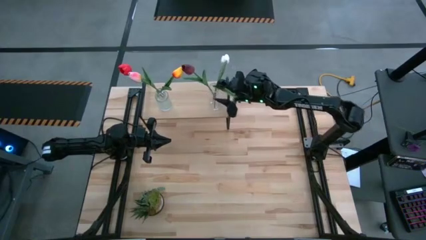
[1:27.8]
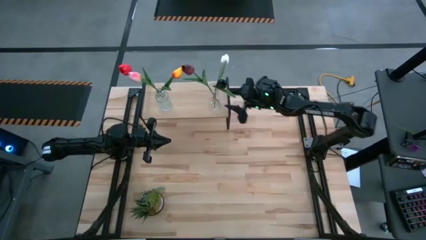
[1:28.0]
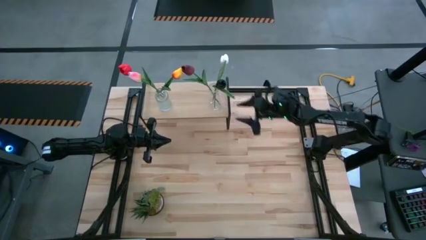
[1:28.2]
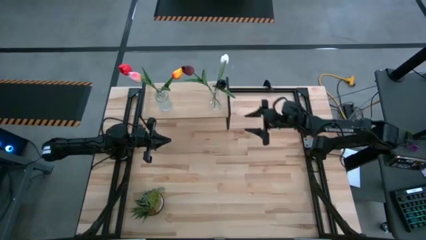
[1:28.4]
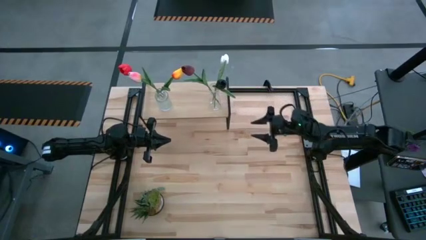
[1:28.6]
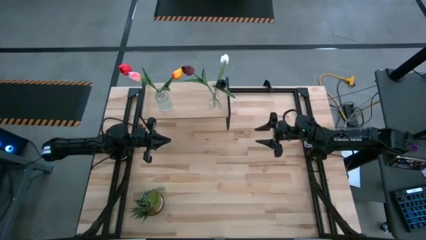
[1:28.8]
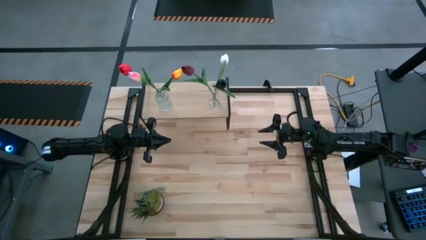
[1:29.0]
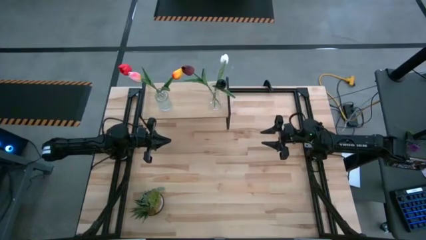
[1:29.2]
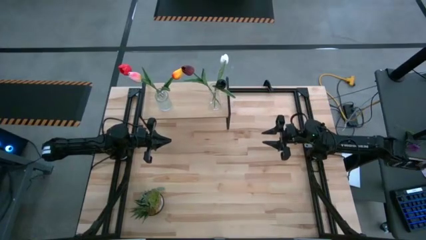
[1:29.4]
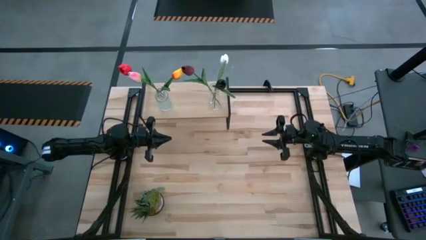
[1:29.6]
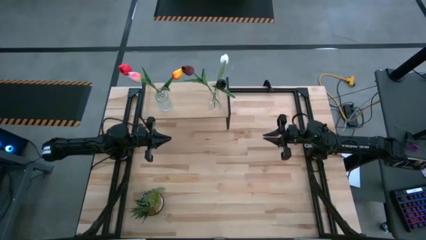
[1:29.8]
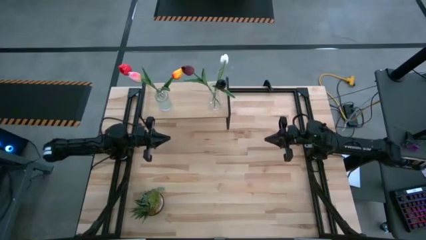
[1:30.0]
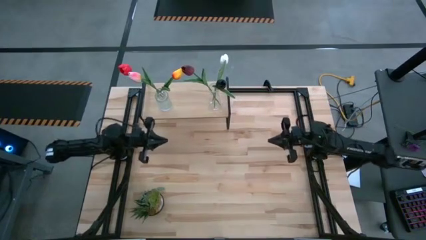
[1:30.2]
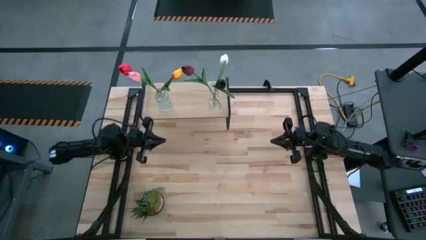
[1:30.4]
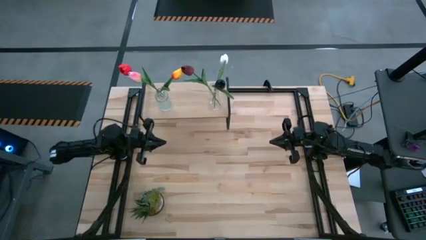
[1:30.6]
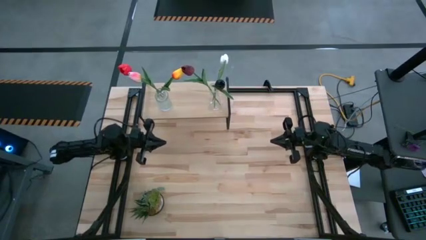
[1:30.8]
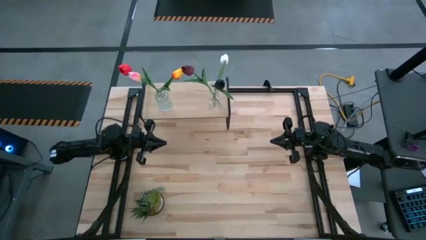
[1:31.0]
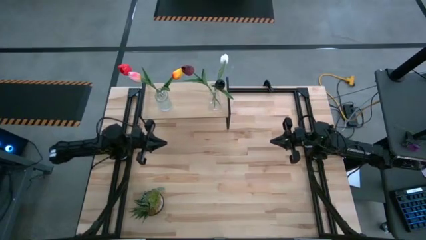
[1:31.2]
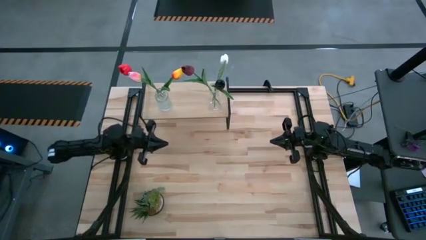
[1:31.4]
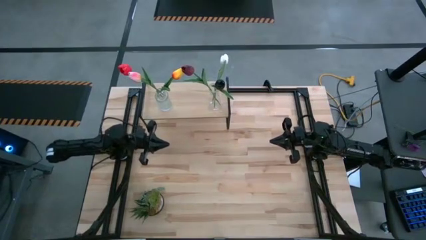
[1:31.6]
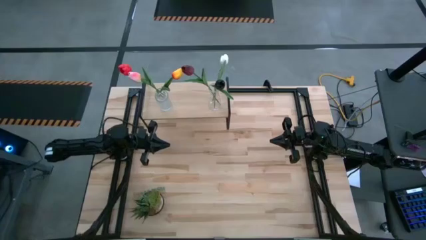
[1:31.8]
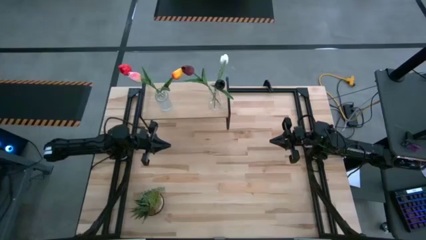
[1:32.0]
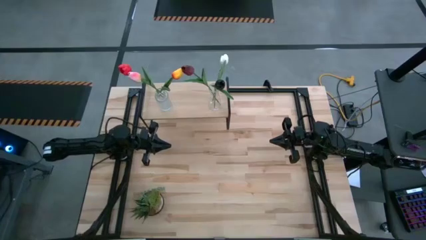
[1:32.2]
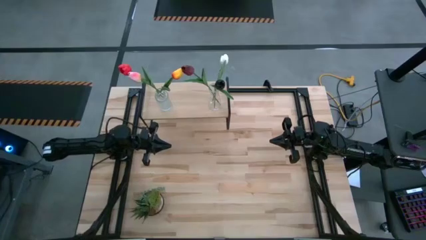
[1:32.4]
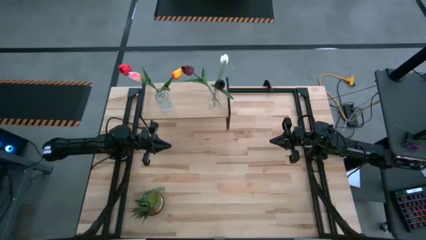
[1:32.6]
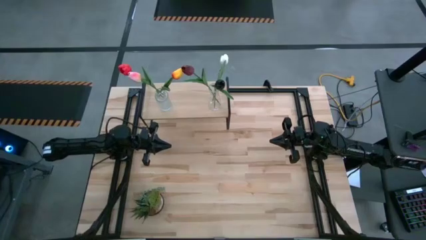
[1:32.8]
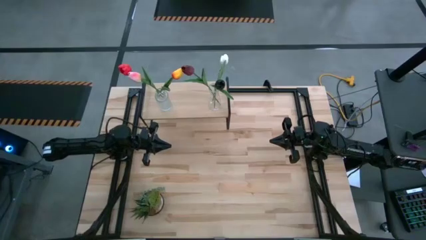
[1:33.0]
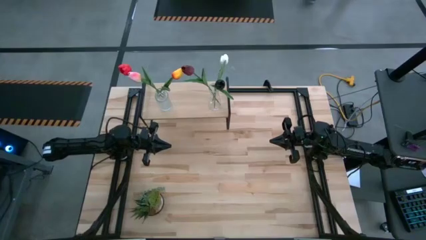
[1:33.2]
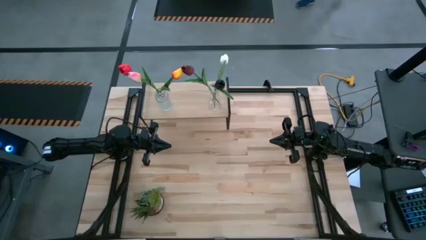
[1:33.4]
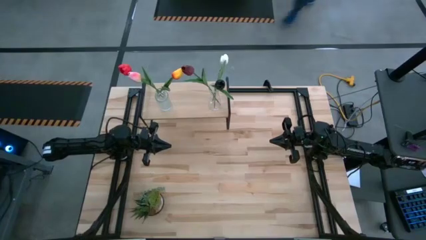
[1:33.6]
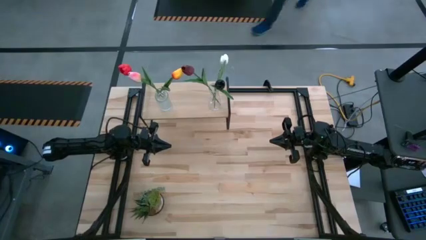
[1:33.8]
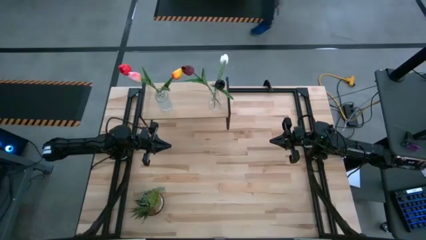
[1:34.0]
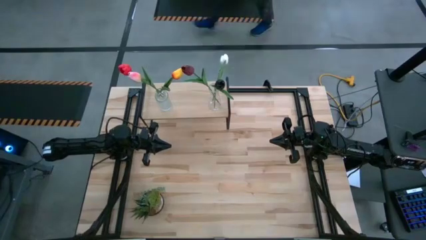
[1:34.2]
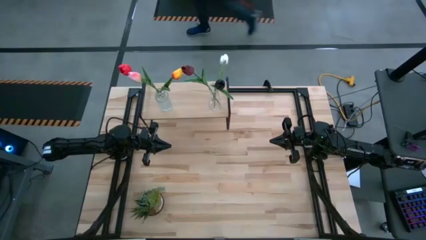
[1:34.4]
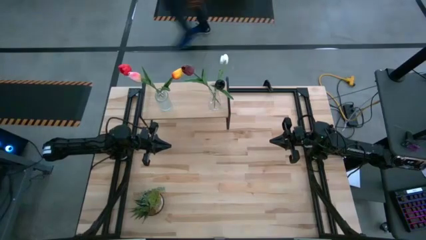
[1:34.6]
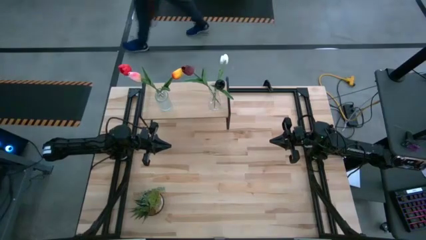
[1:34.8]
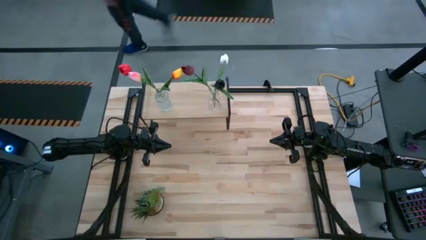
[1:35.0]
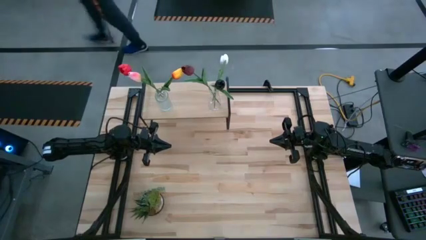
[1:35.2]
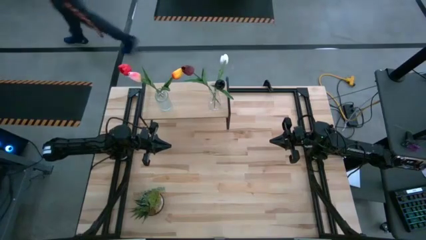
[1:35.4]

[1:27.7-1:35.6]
Task: Pick and place flowers into a vace then onto a shelf
Return to Home Position

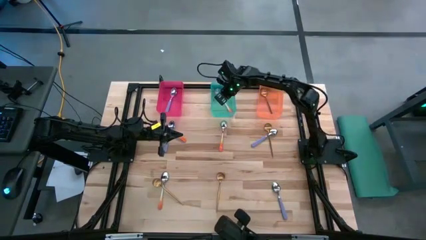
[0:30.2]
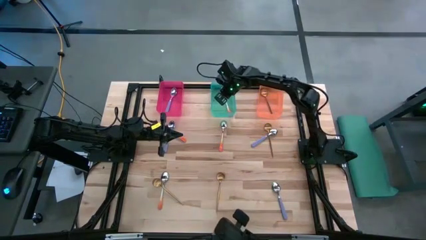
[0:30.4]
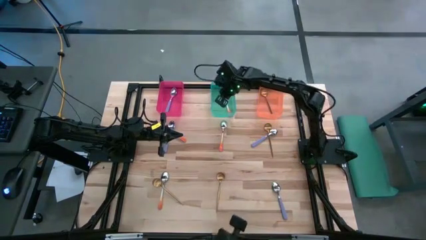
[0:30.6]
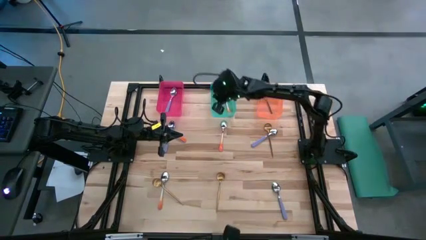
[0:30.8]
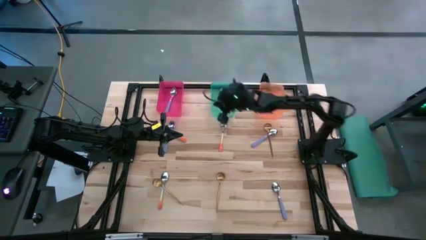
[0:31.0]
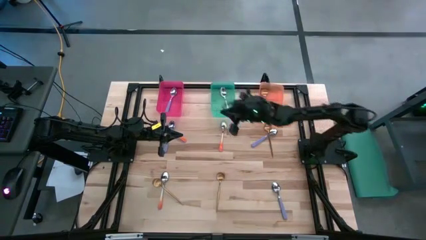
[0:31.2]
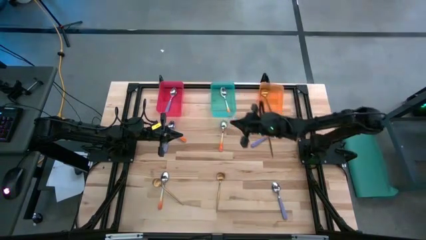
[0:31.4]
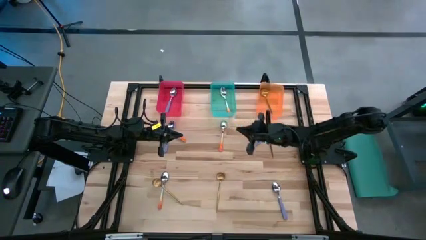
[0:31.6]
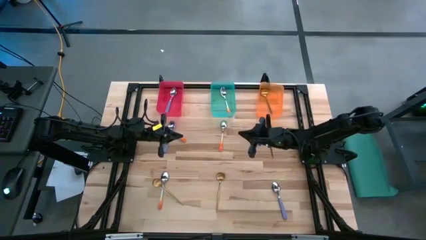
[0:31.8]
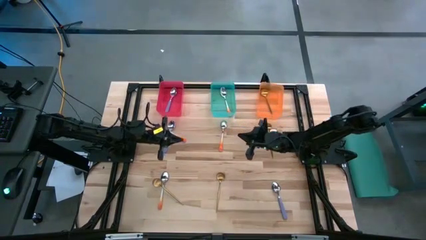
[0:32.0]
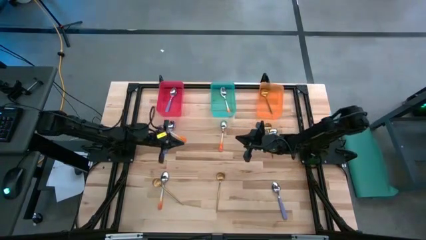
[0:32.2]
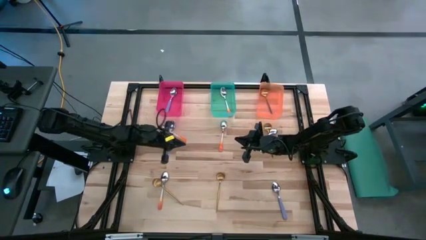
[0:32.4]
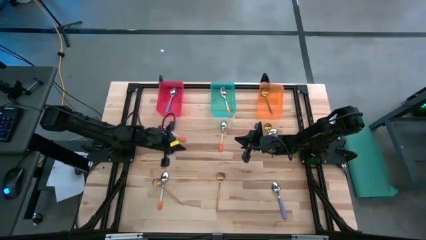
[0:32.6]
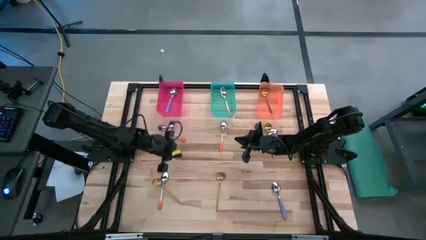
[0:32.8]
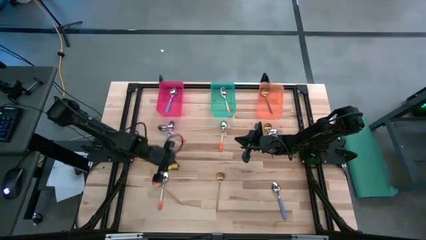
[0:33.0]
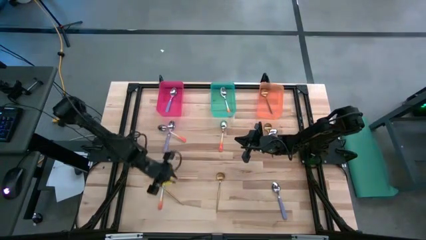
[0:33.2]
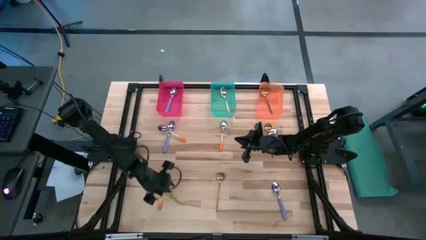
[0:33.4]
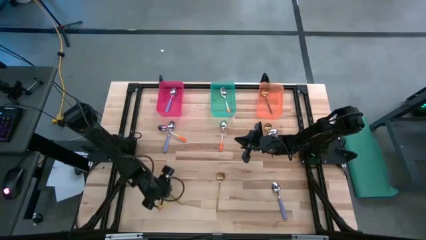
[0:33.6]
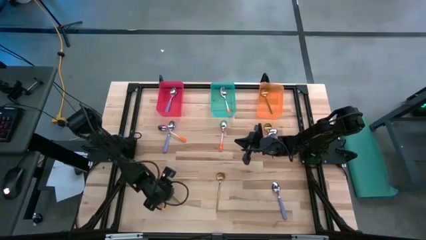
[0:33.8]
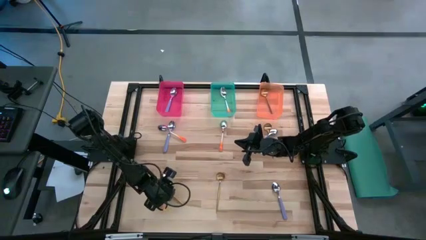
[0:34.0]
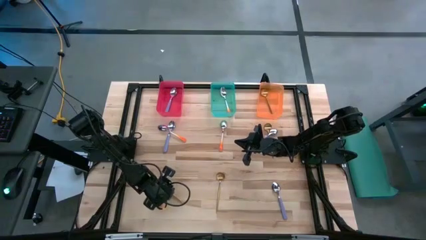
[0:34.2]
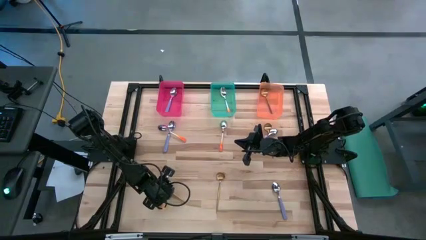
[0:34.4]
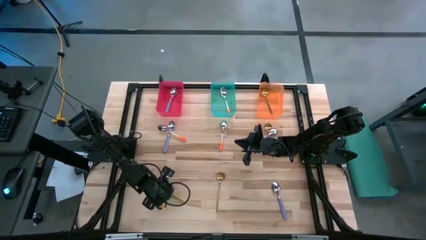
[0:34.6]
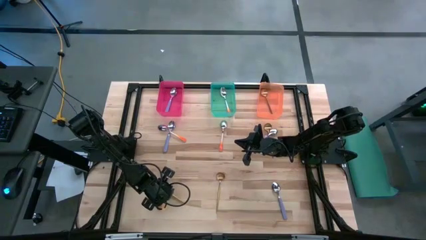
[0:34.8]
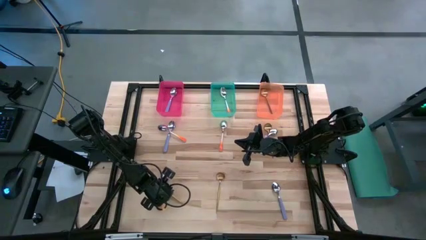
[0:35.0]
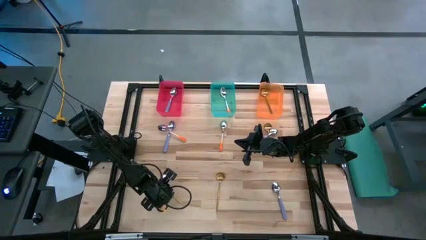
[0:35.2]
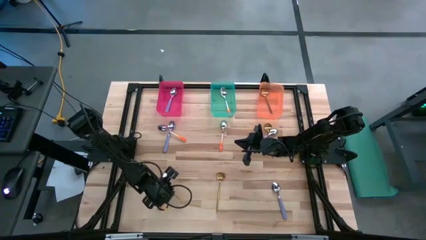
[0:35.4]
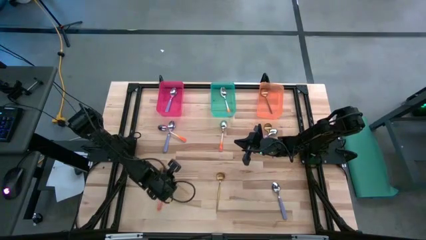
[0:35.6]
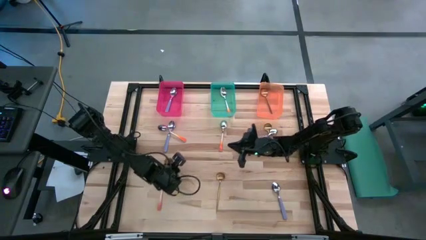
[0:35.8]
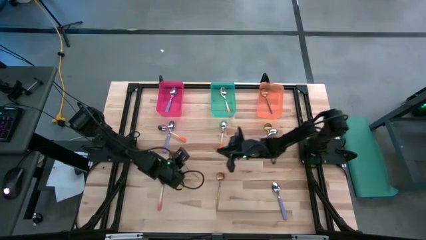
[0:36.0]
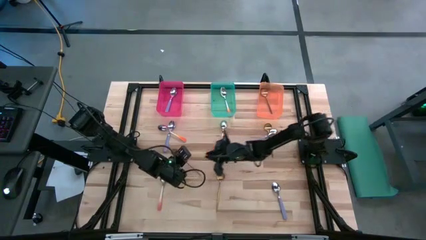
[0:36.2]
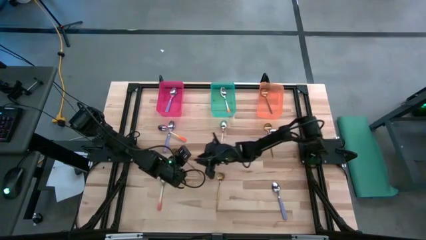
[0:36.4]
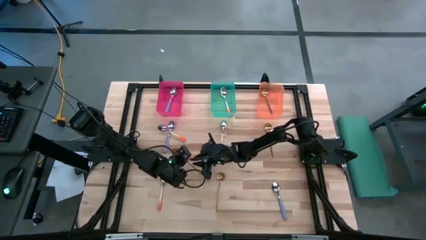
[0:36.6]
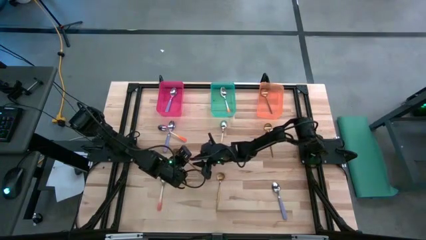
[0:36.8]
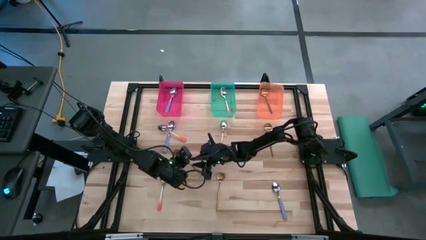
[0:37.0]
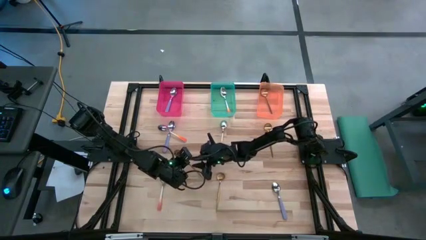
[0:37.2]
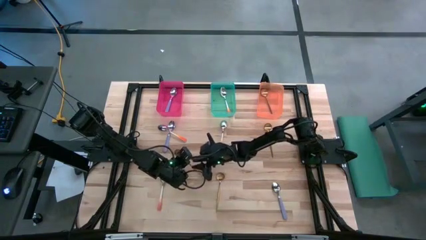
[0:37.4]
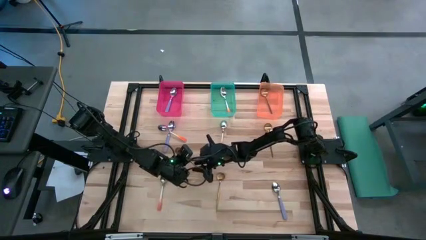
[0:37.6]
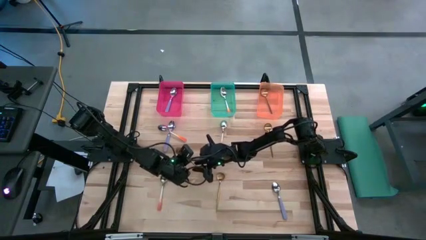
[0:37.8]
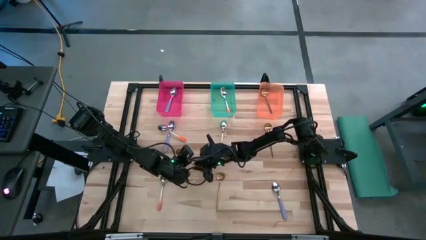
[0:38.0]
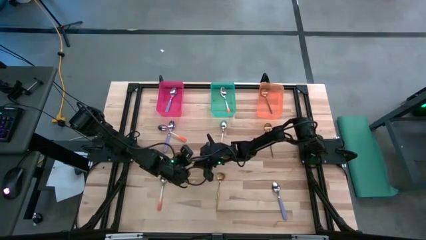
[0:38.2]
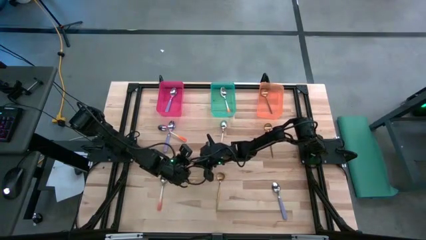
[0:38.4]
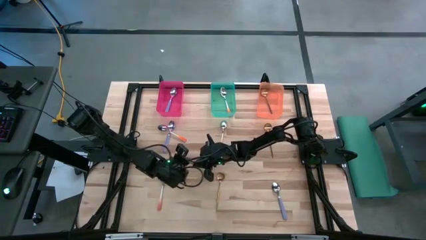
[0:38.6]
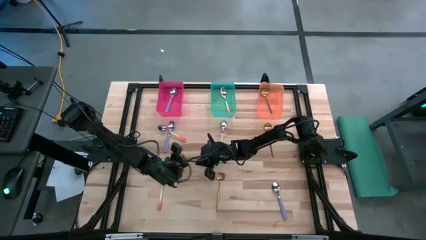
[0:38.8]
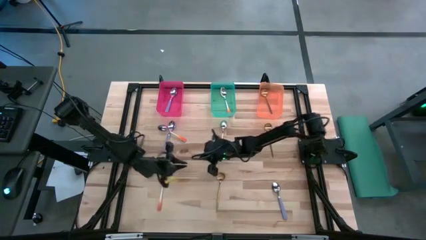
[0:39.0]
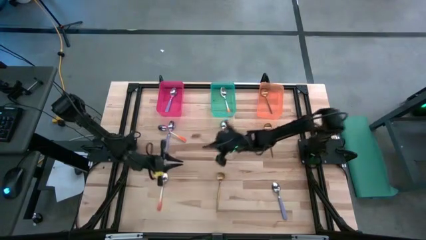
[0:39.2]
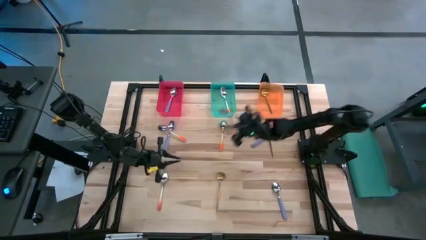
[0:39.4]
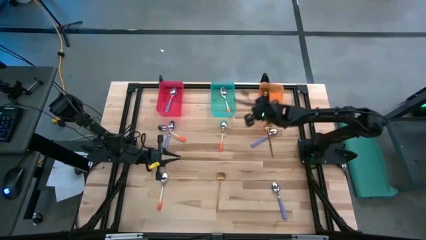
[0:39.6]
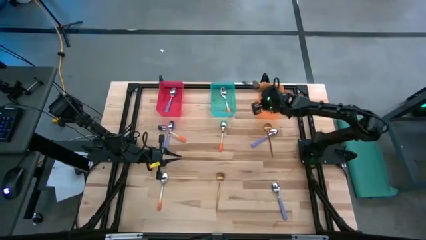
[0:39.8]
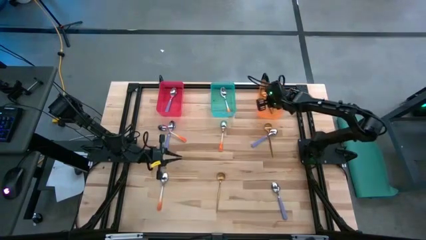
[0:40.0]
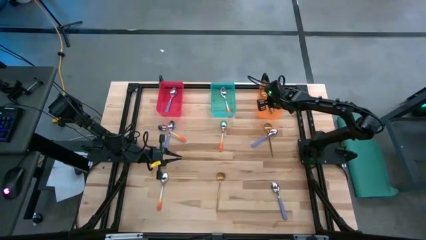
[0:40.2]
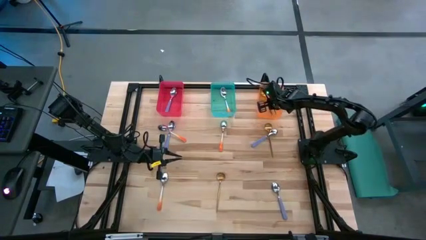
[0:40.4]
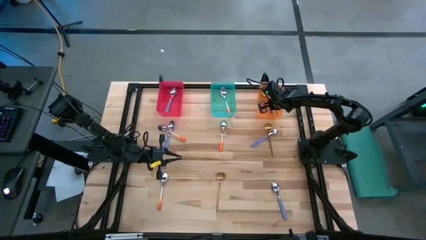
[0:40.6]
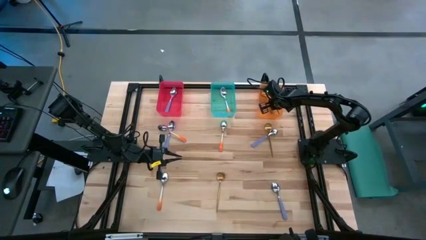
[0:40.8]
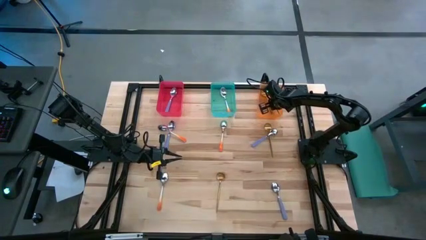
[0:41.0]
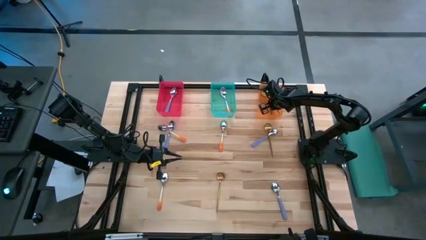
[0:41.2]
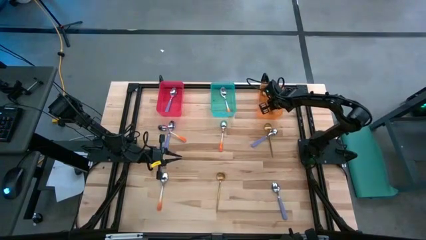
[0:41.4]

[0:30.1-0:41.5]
Task: Sort silverware by color (type)
Put the gold spoon into the orange bin
